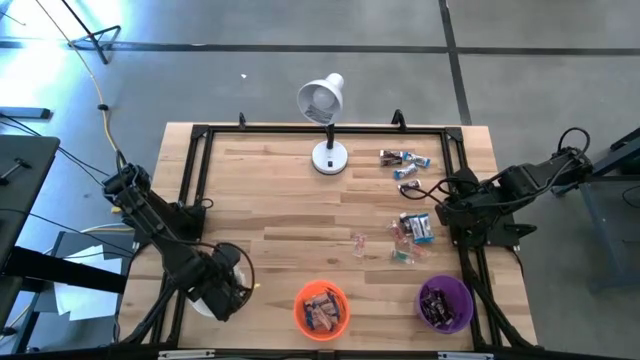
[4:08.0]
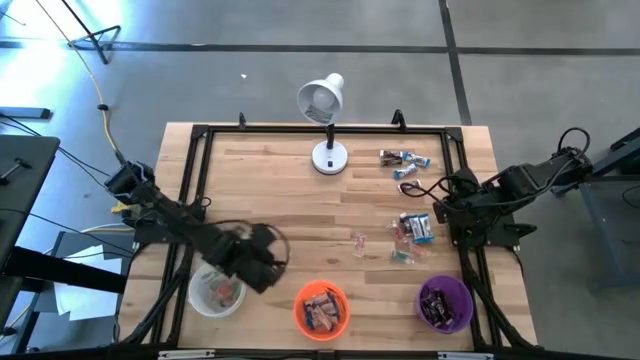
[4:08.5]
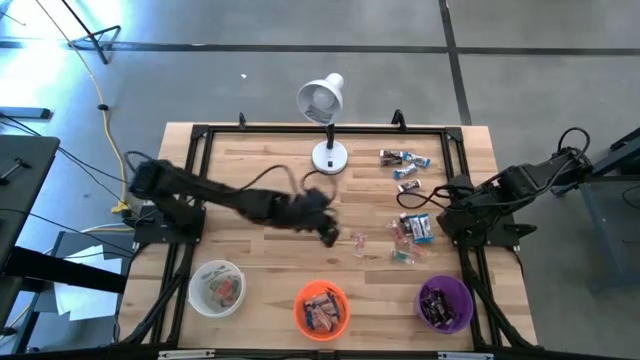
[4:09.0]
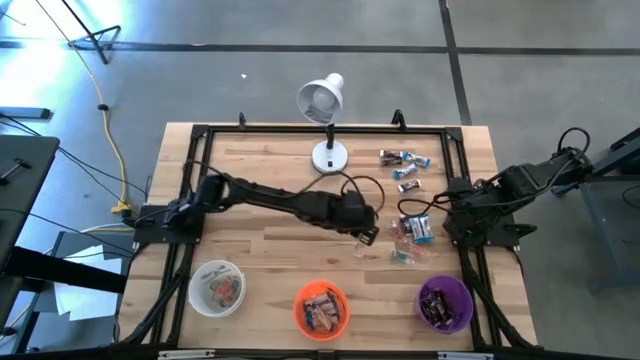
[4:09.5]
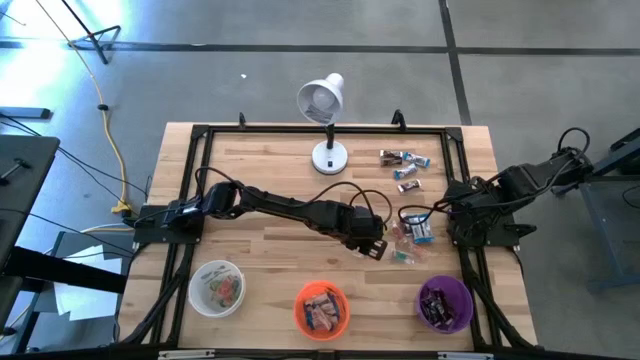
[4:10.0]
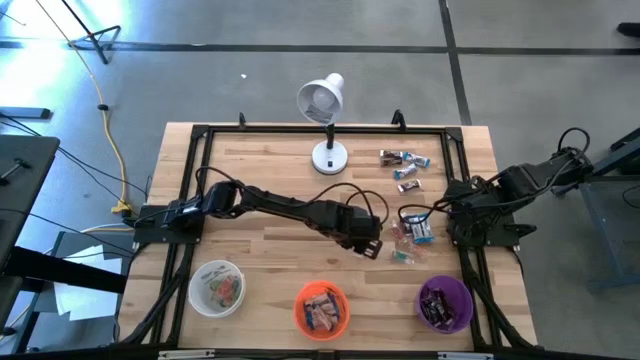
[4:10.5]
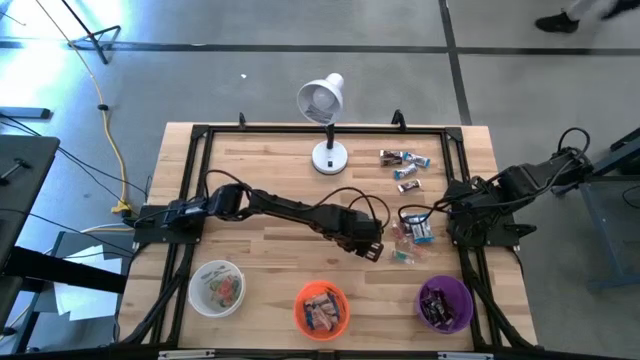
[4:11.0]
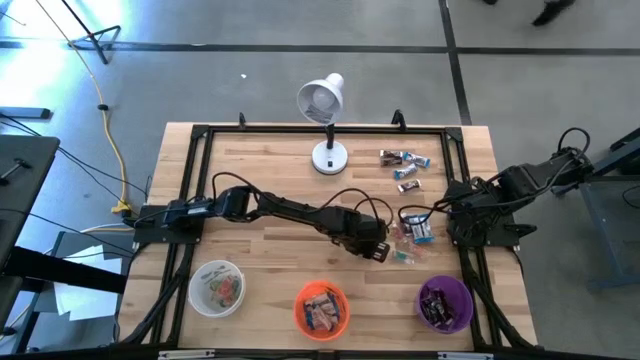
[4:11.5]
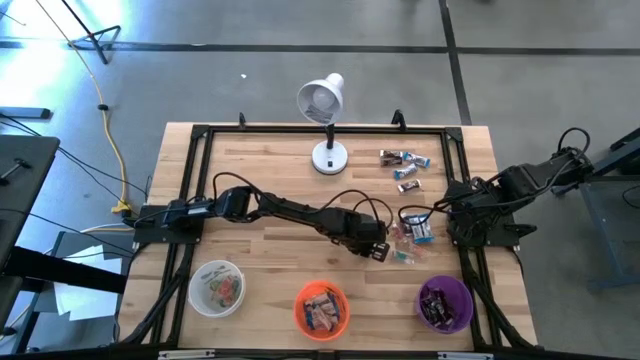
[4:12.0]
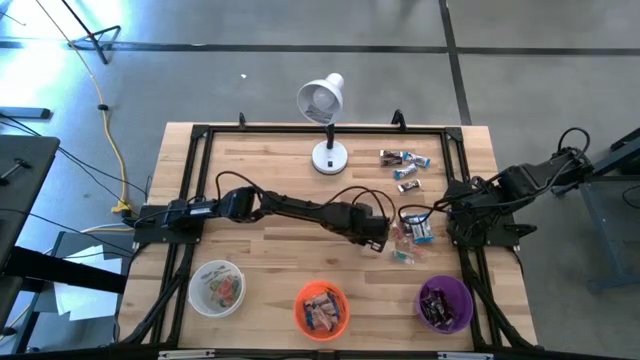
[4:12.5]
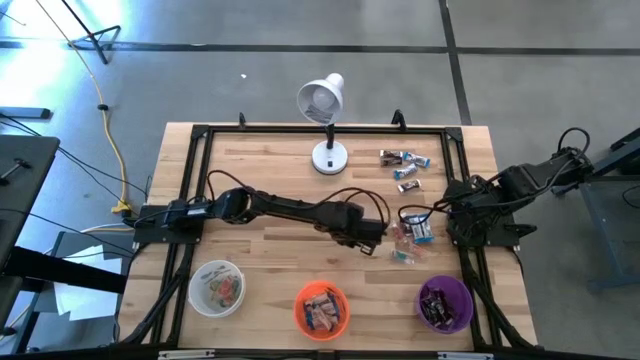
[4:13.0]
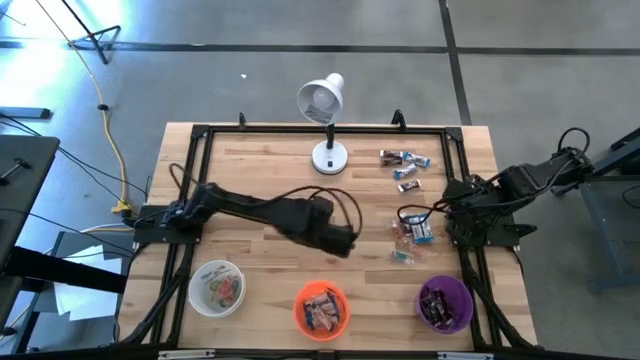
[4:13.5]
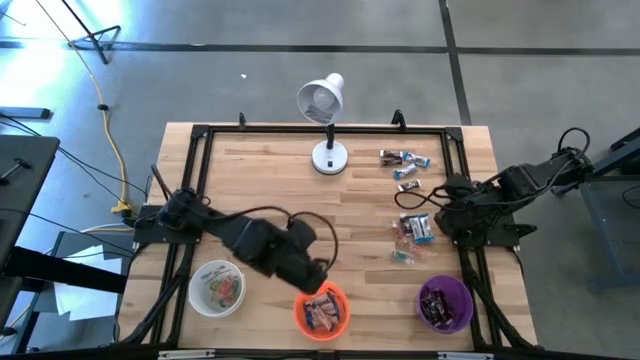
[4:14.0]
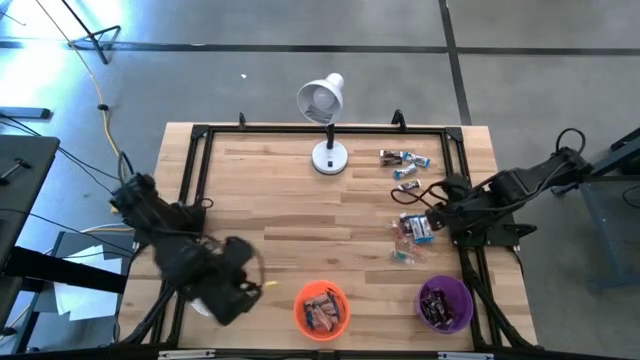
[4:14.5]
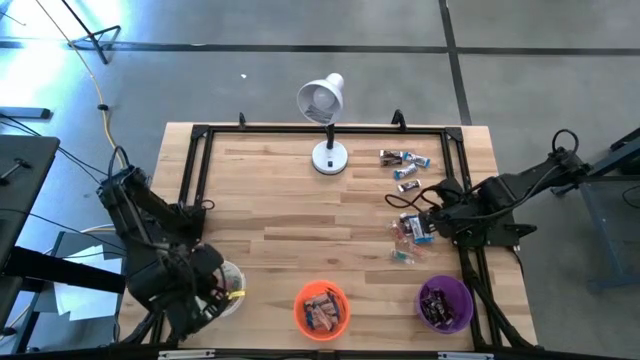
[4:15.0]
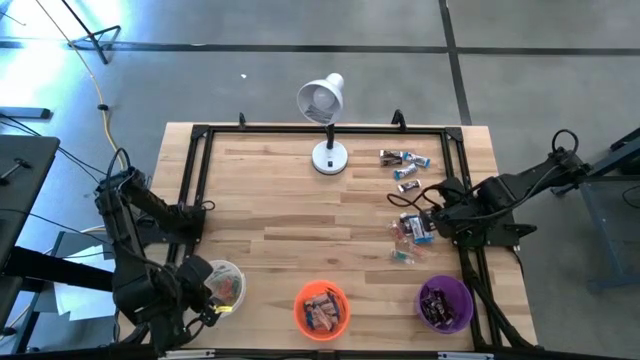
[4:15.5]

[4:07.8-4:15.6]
Task: Organize candy in baskets
Put the orange gummy into the white bucket

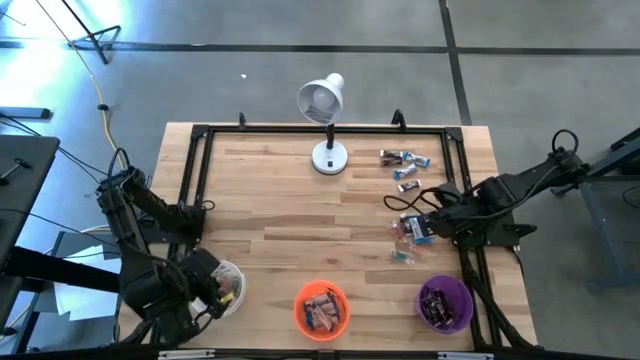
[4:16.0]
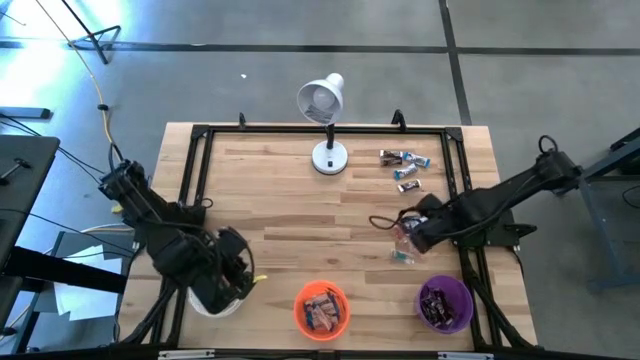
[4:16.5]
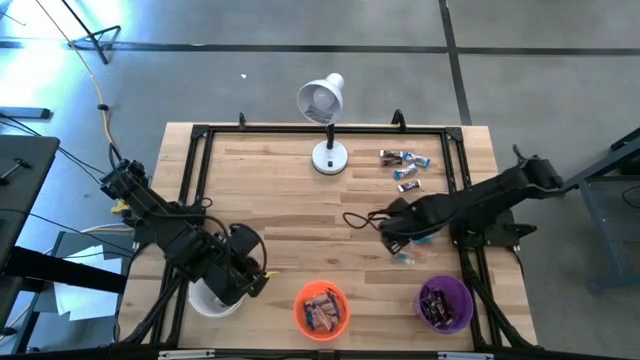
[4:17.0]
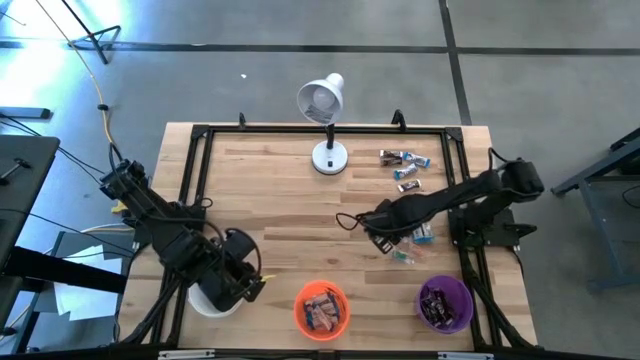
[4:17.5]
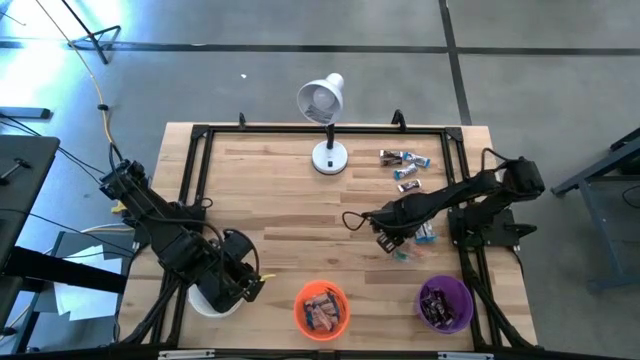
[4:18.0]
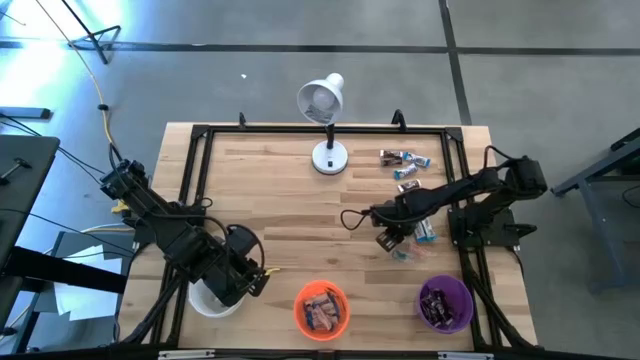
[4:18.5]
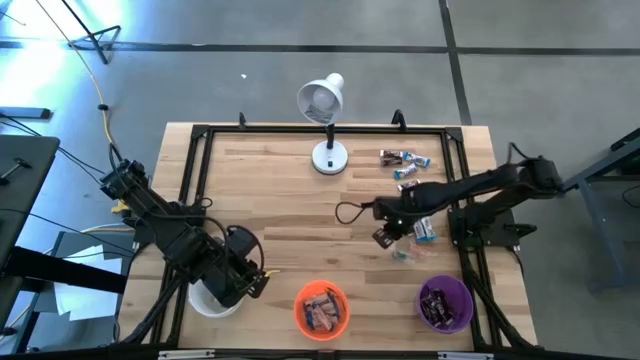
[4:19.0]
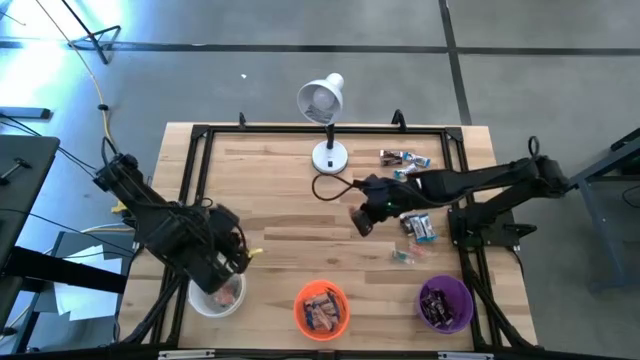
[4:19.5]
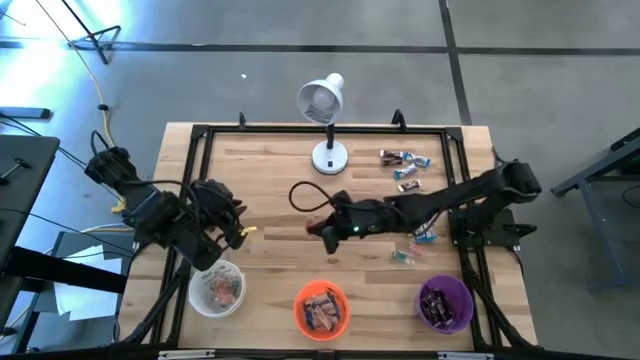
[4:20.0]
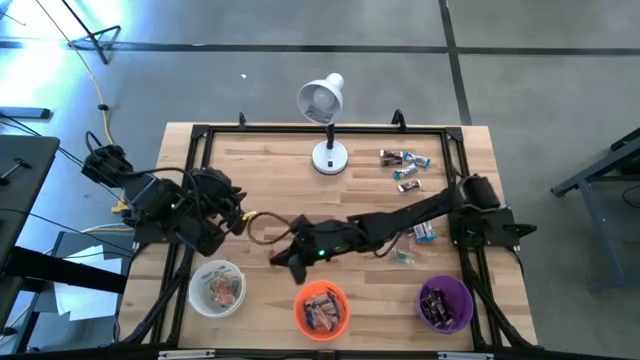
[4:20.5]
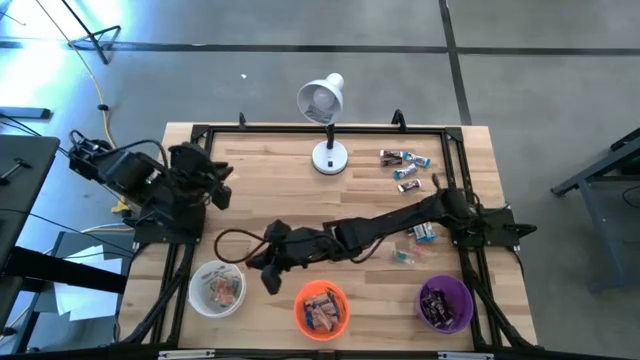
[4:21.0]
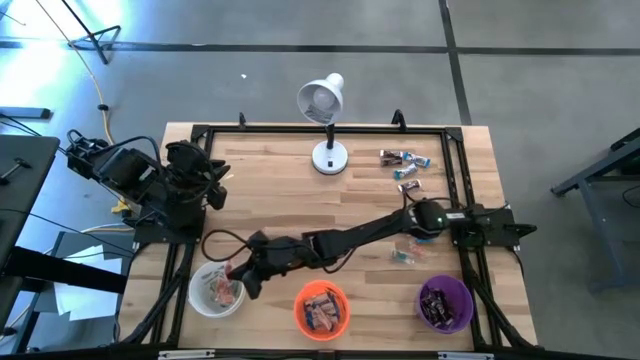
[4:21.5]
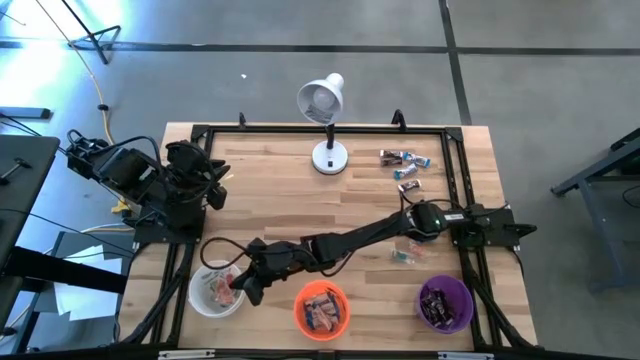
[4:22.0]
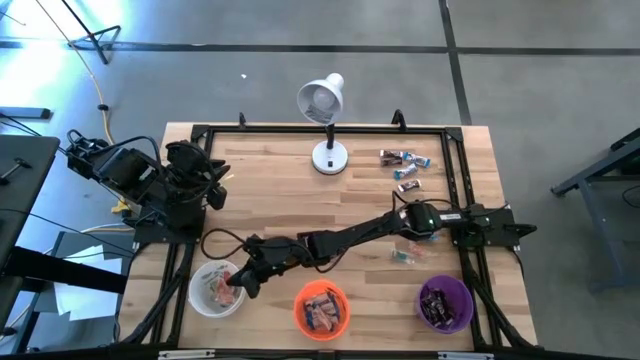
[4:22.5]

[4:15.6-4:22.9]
Put the red gummy into the white bucket

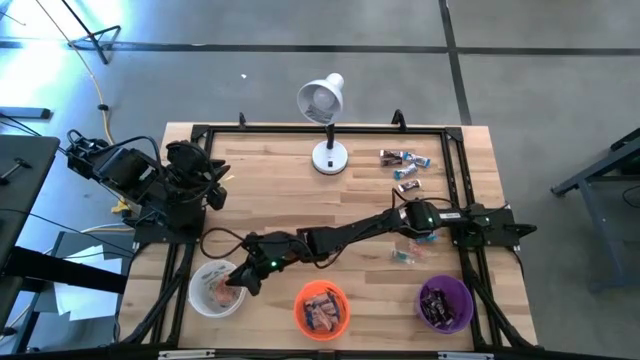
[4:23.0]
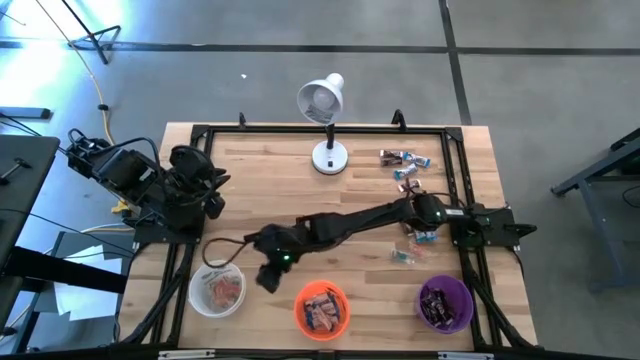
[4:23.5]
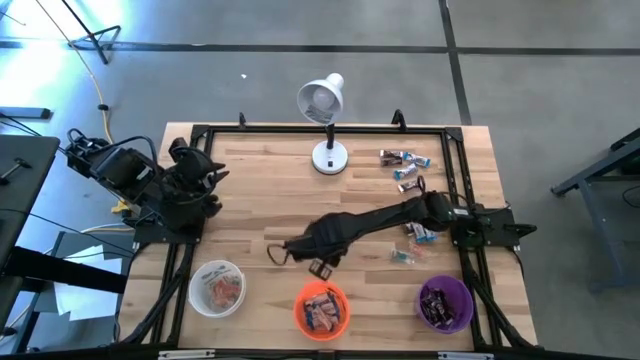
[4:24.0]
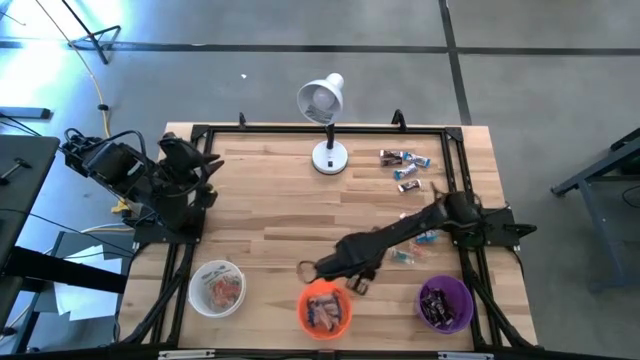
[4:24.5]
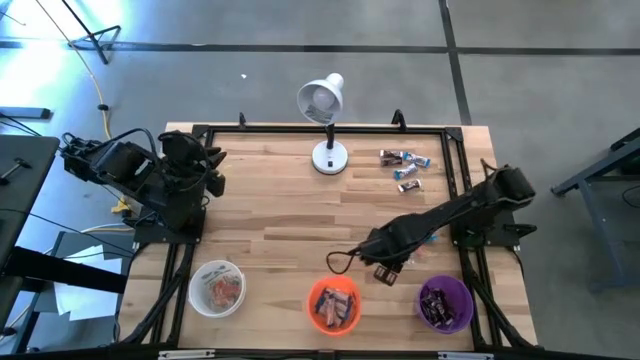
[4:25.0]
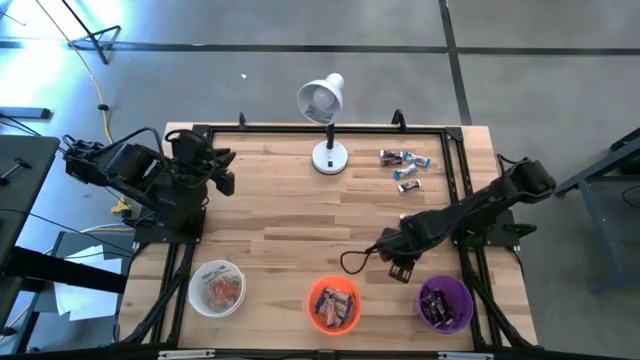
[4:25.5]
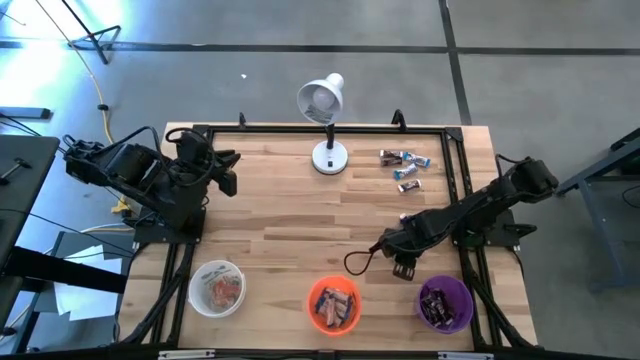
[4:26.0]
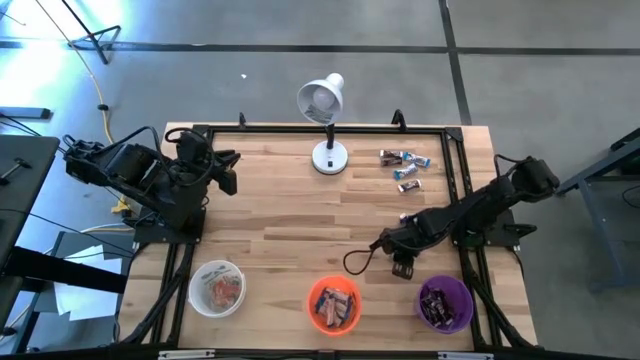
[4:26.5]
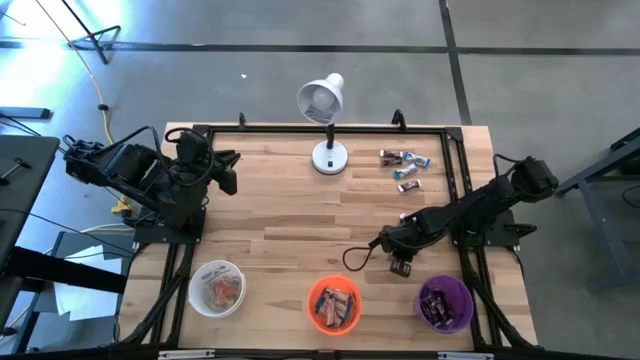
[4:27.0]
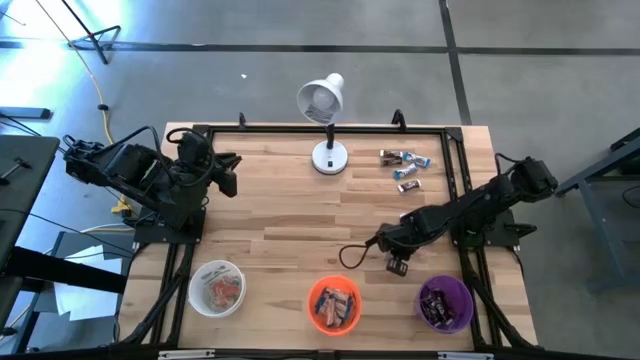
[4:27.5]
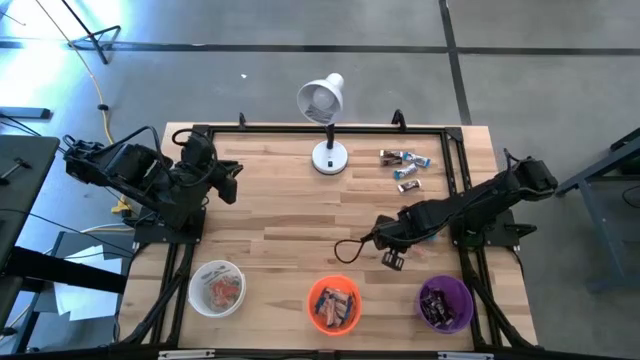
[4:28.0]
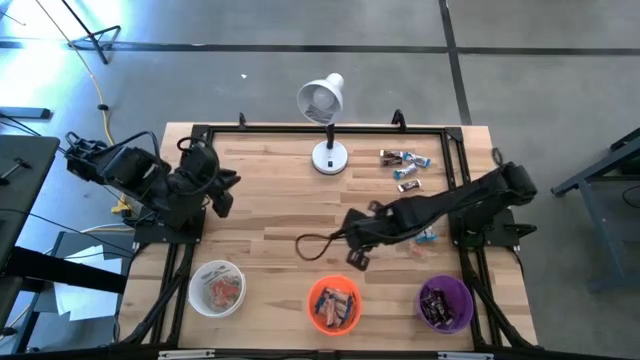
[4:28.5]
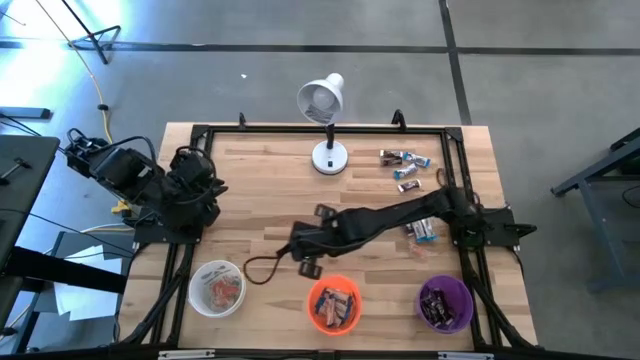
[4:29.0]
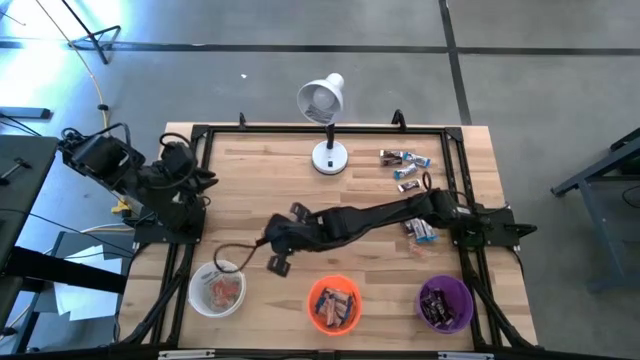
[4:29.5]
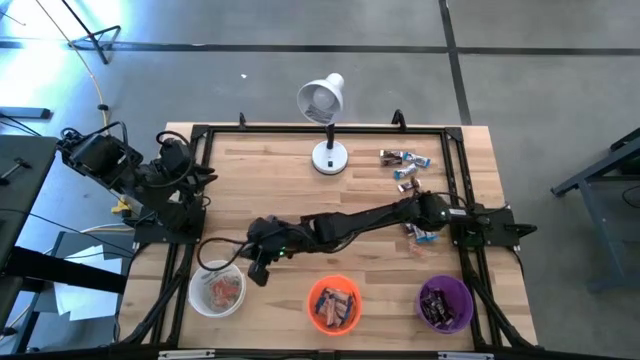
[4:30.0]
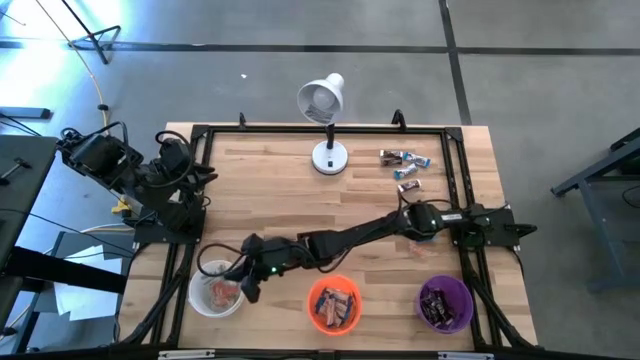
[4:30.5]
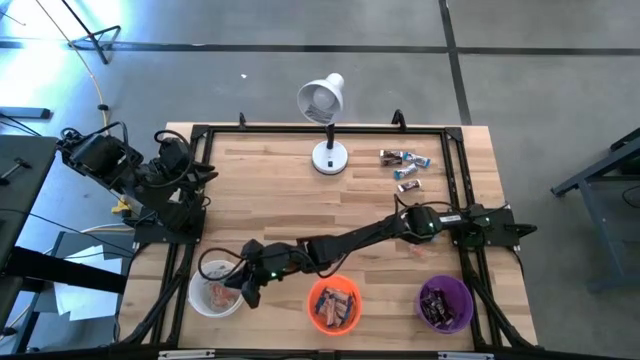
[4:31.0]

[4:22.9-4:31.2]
Put the blue gummy into the white bucket
